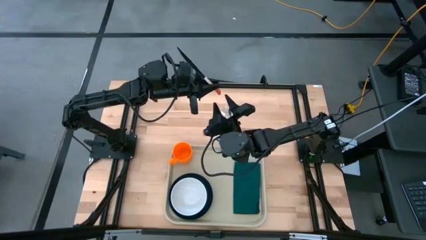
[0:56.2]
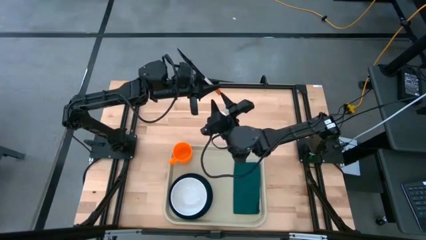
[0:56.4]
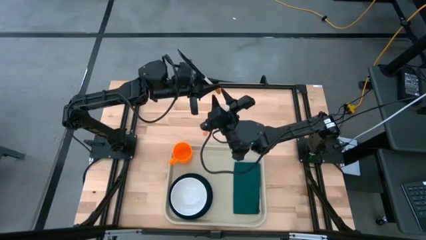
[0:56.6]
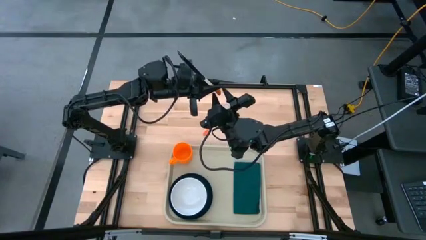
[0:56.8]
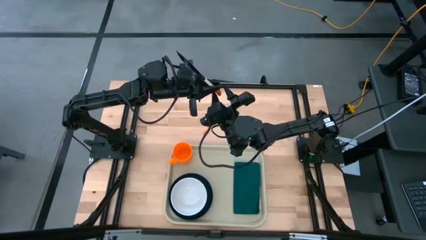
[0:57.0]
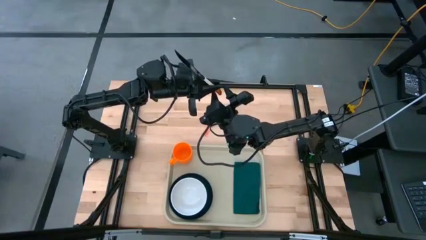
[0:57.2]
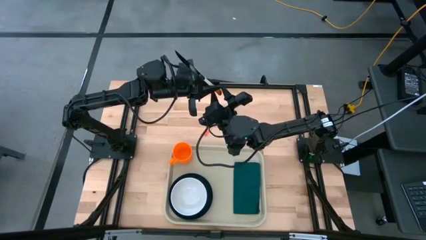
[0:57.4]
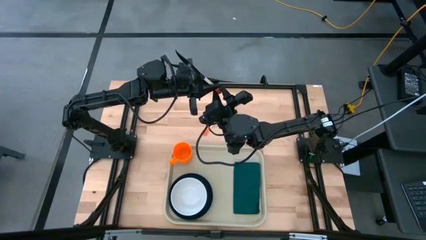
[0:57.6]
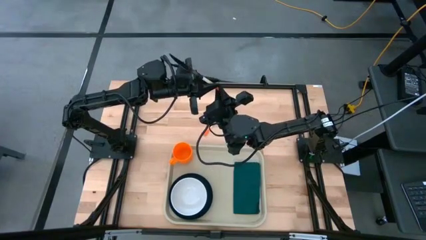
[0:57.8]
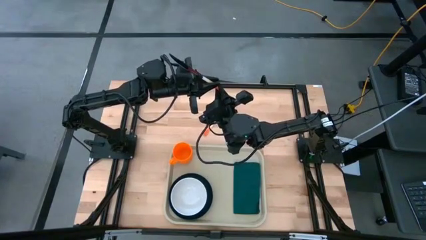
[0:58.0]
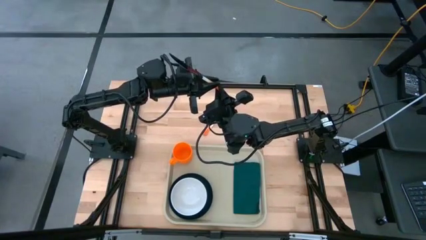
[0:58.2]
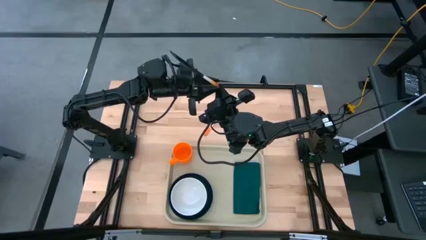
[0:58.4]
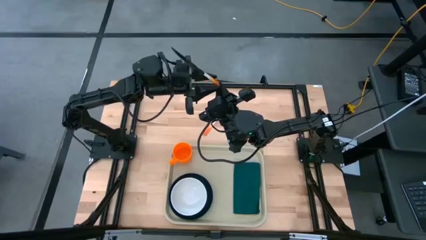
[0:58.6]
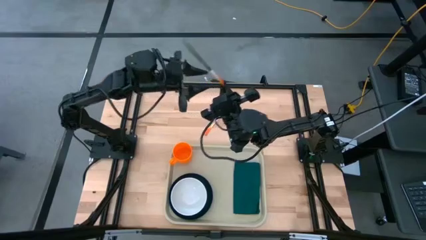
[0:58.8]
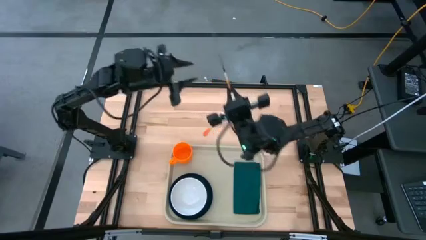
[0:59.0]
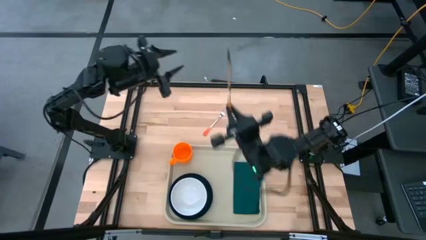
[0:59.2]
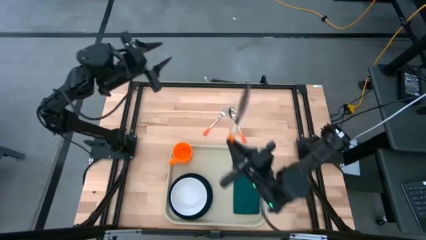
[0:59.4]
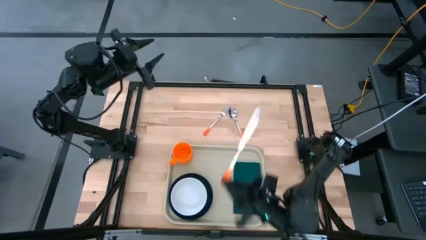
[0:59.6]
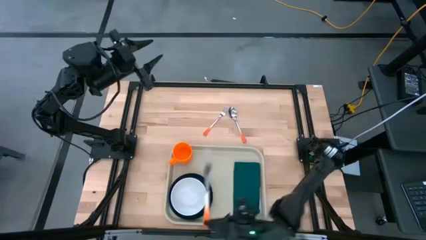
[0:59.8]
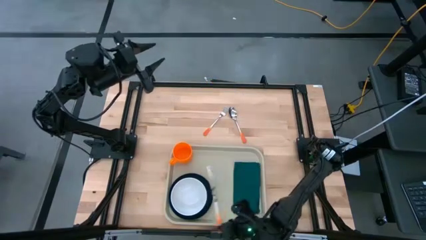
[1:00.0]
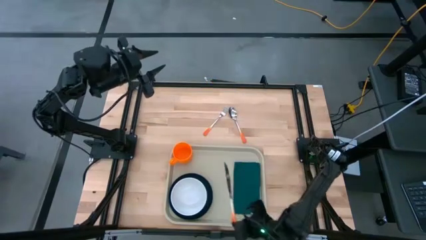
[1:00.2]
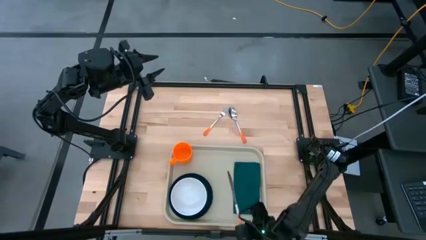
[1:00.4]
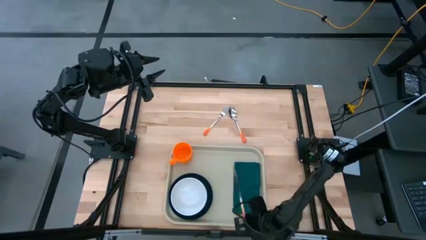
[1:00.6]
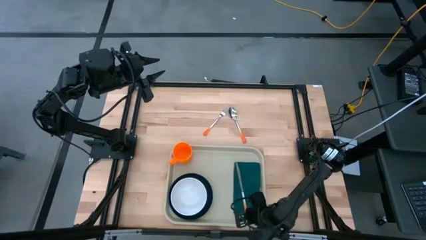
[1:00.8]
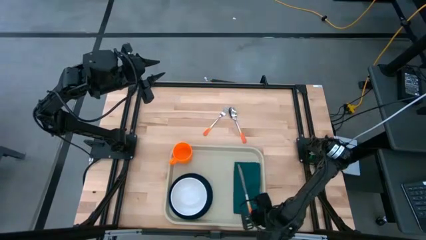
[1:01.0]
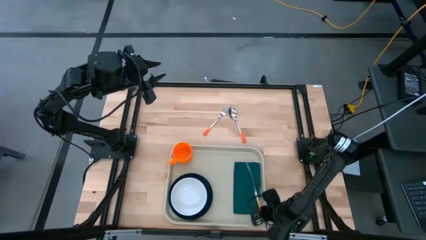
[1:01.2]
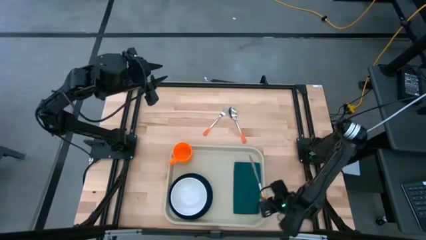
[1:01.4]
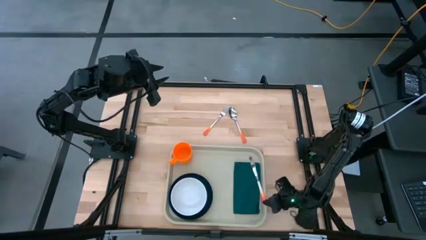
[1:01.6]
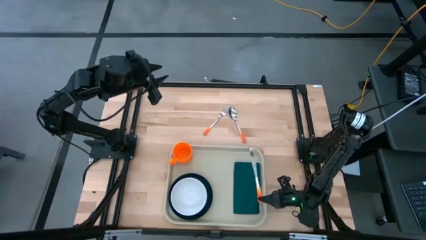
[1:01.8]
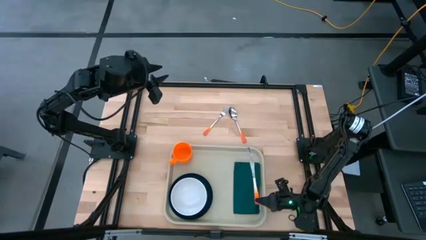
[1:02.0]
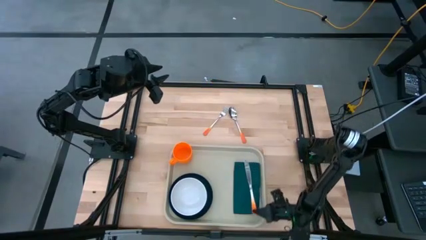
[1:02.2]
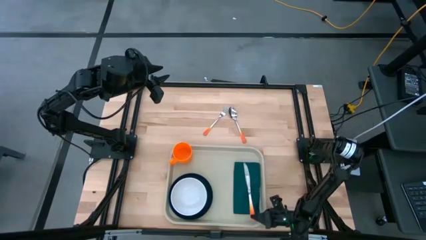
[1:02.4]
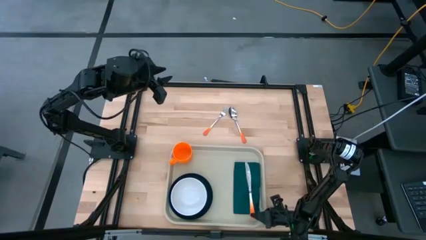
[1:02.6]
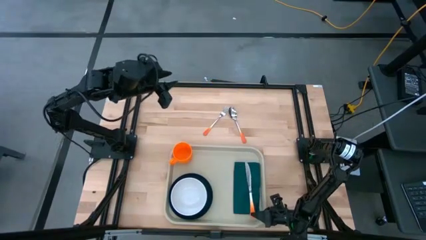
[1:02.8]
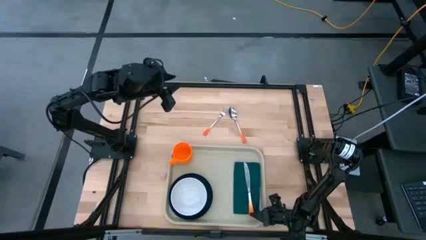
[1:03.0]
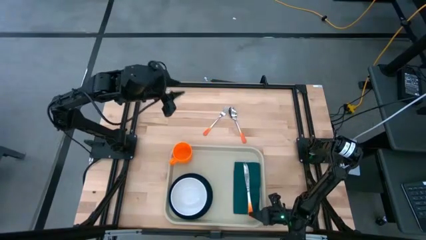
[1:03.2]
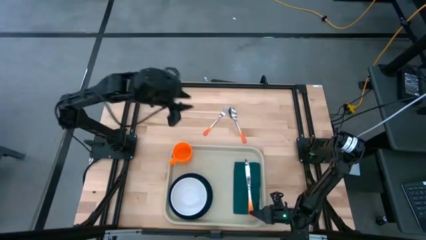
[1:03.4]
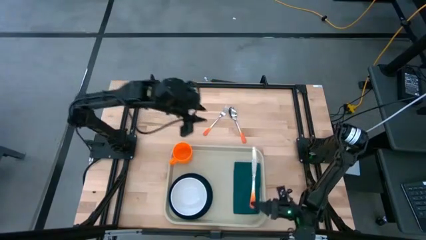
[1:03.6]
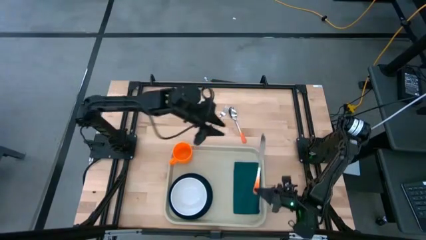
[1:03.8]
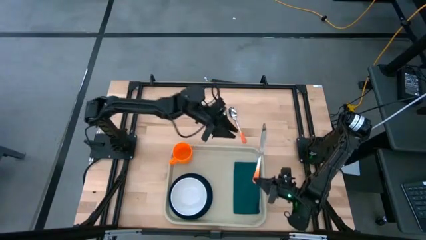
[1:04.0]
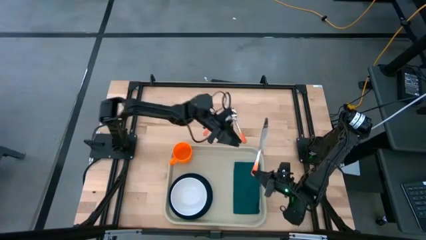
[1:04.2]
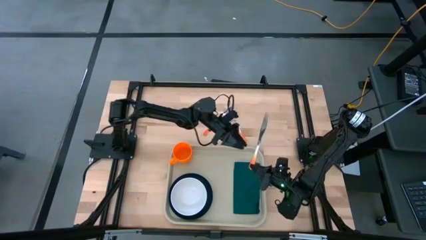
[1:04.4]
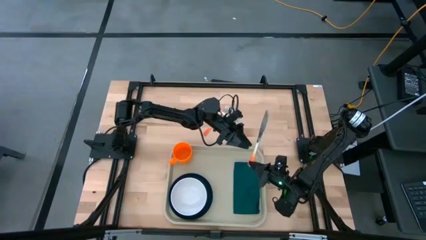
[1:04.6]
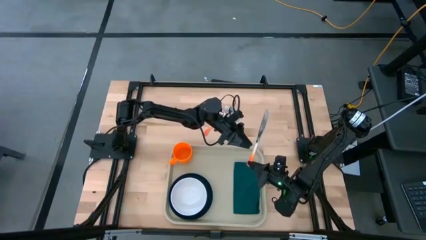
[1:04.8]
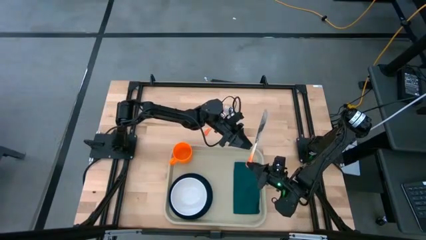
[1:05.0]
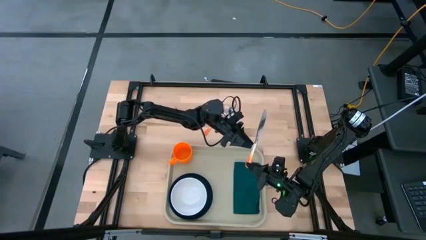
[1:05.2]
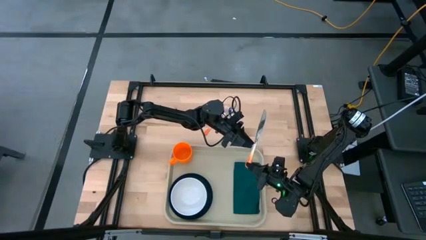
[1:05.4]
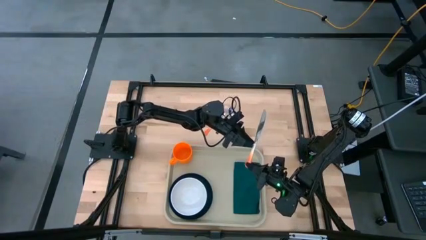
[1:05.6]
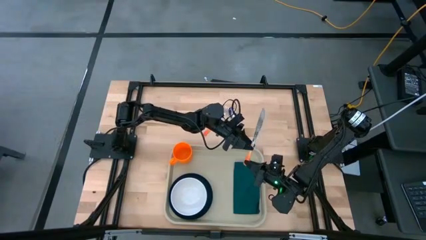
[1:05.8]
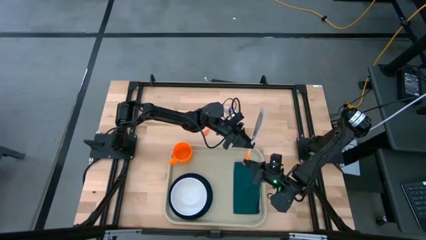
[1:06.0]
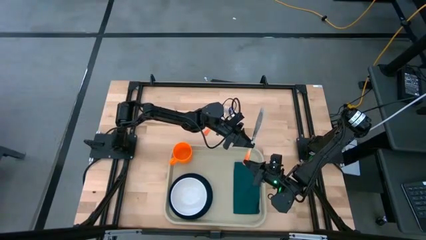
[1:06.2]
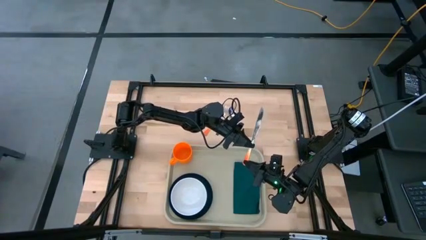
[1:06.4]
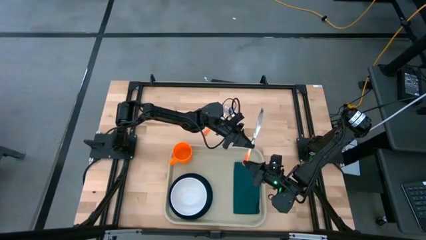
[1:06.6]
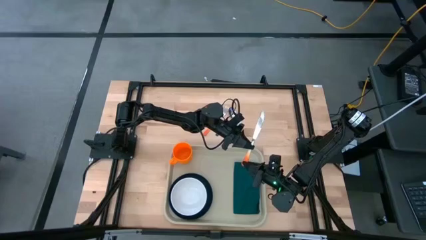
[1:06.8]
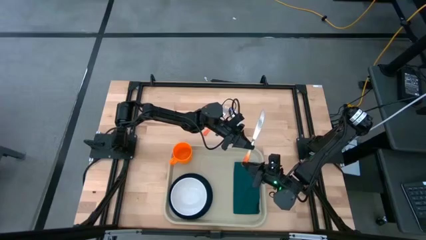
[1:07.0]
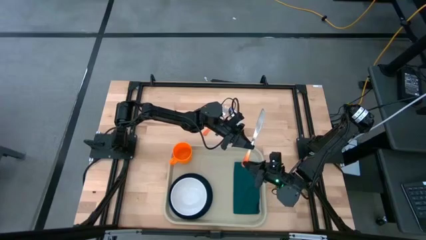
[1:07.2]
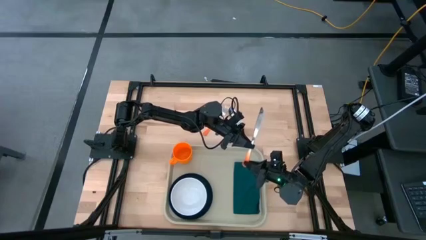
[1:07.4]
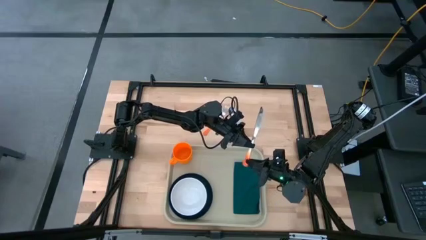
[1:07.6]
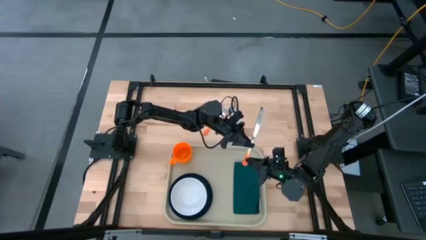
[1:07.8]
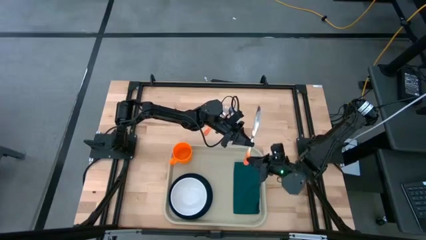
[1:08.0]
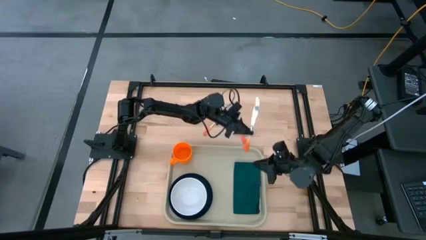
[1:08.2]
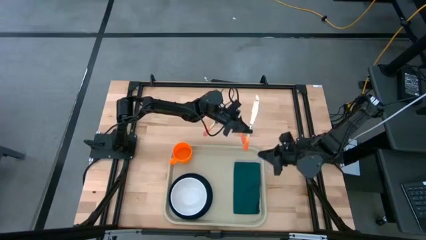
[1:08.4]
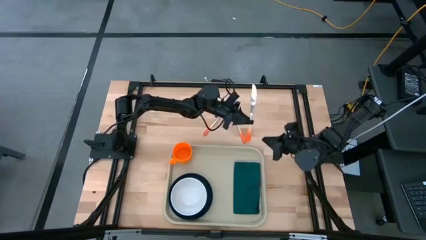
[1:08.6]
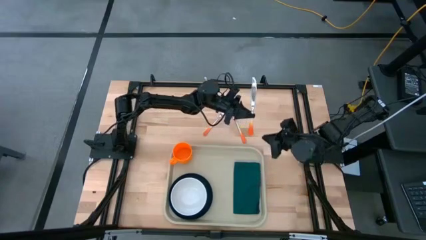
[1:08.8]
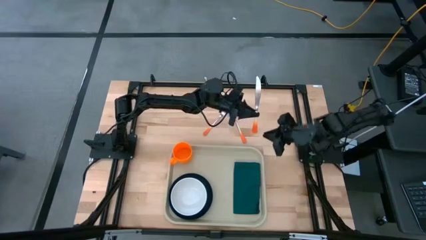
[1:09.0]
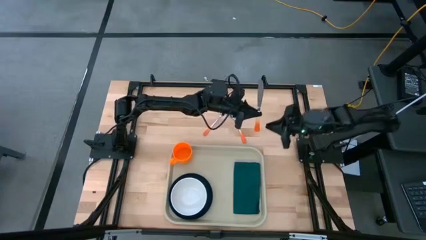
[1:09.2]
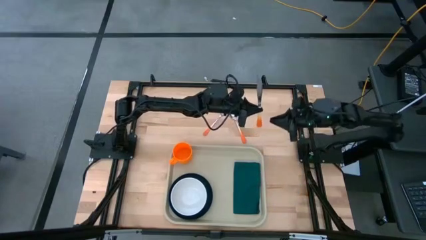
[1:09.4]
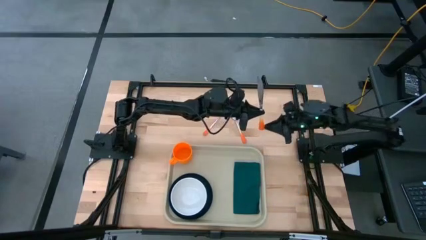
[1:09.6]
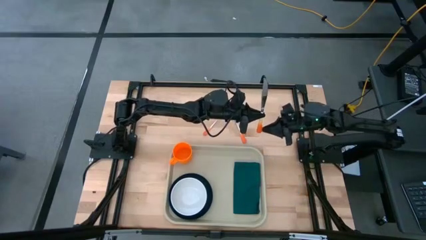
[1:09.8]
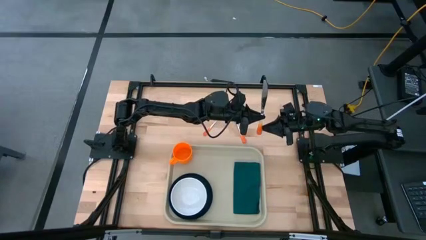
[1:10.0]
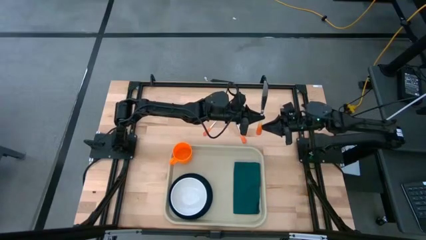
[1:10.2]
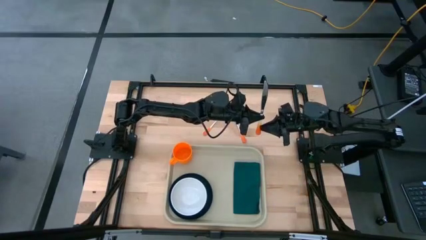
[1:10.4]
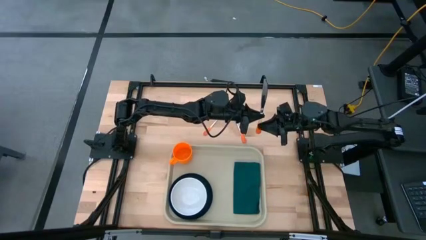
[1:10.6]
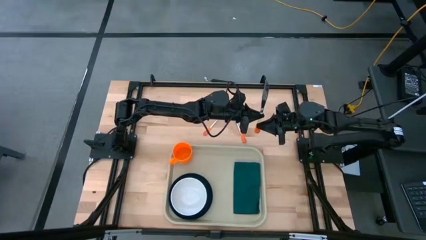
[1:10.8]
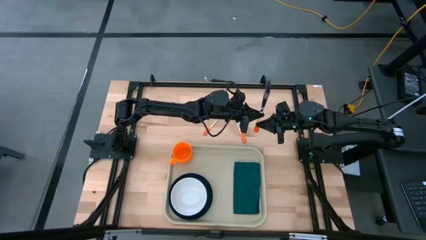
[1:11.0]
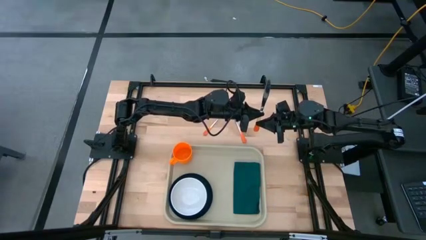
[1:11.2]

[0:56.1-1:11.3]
Task: Set up tray
Put the orange knife on the green napkin
